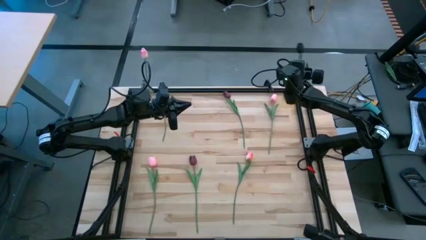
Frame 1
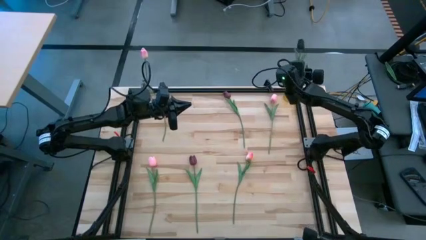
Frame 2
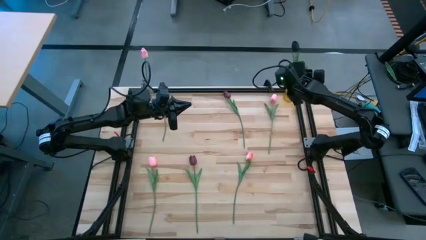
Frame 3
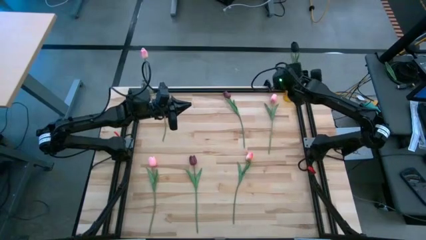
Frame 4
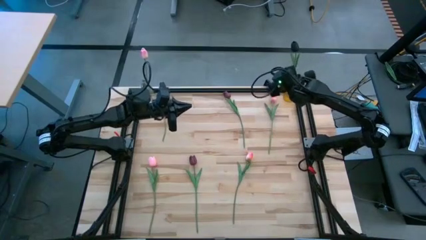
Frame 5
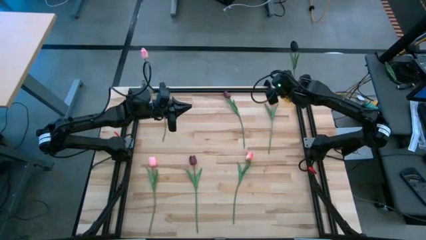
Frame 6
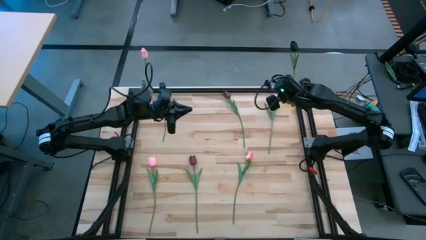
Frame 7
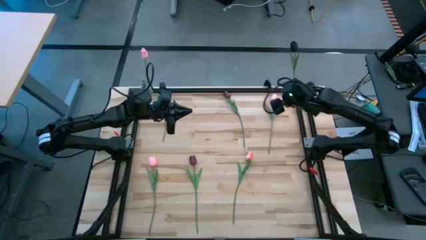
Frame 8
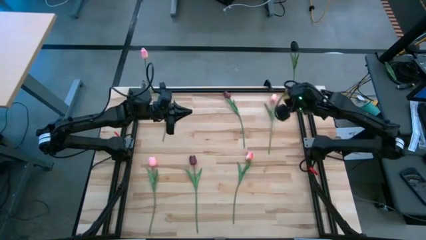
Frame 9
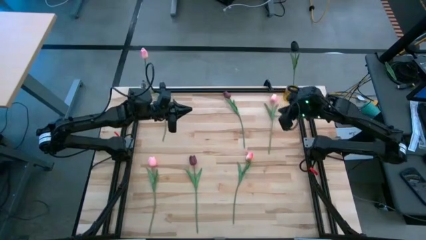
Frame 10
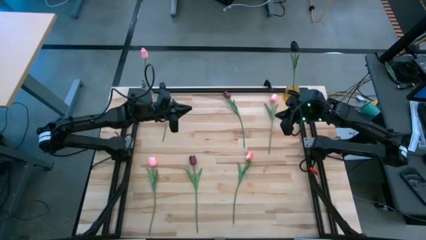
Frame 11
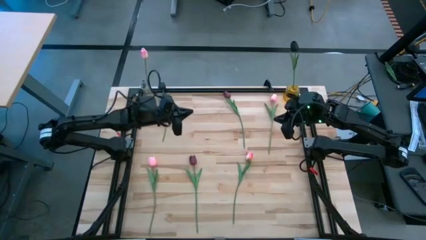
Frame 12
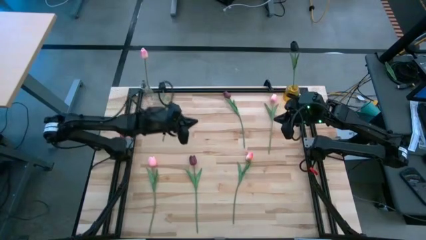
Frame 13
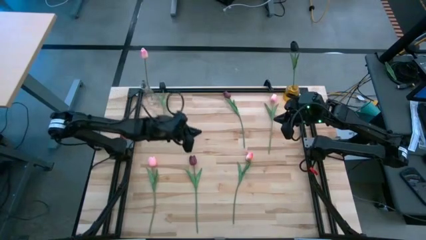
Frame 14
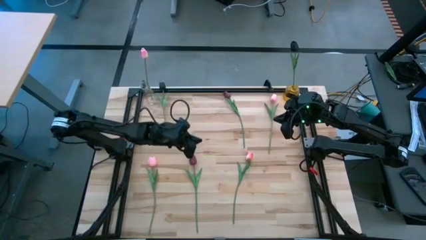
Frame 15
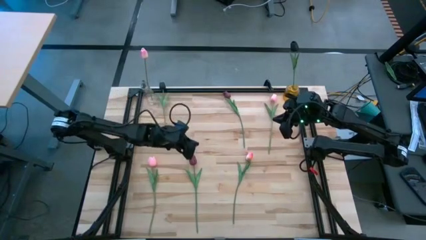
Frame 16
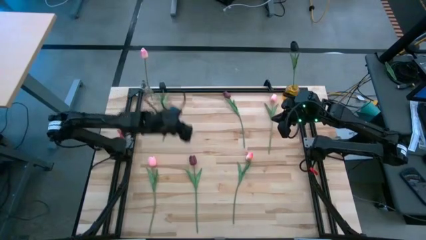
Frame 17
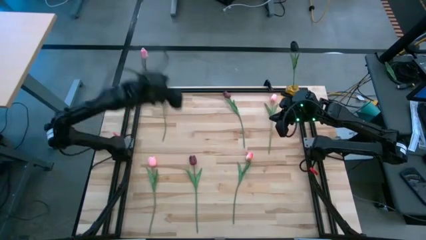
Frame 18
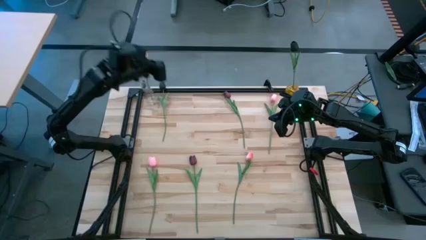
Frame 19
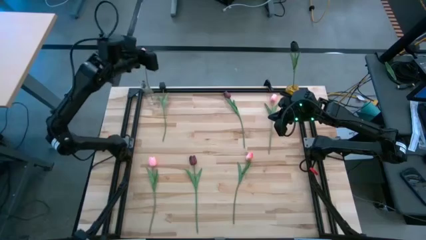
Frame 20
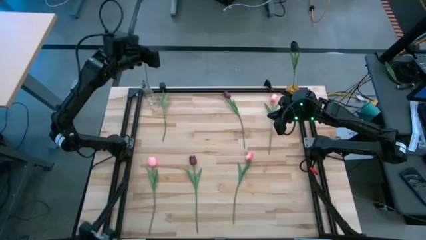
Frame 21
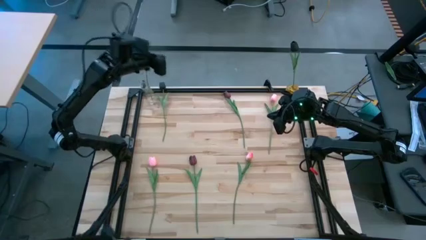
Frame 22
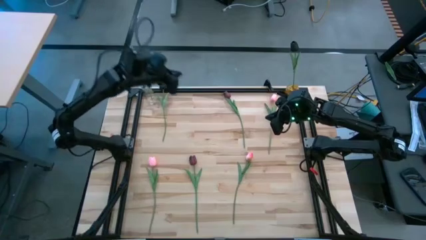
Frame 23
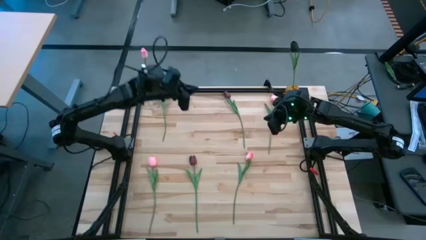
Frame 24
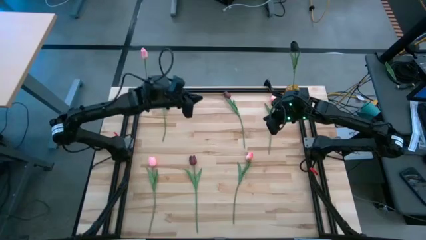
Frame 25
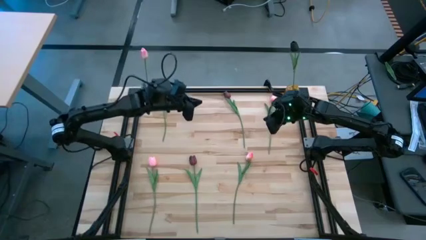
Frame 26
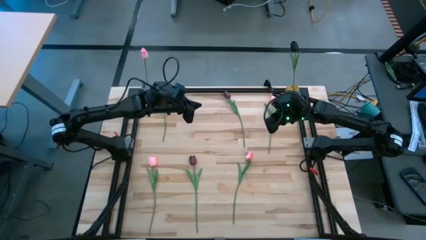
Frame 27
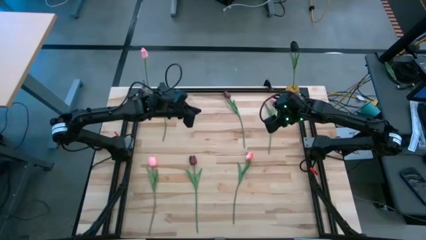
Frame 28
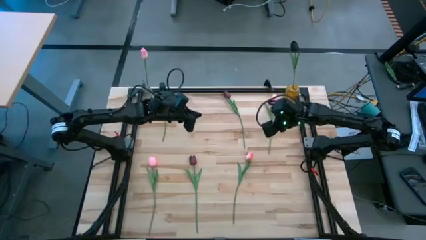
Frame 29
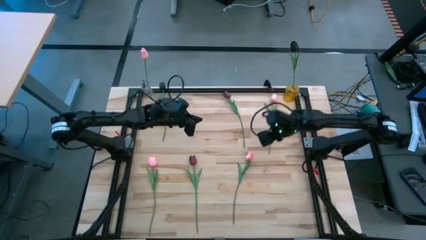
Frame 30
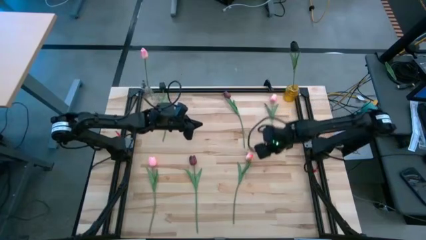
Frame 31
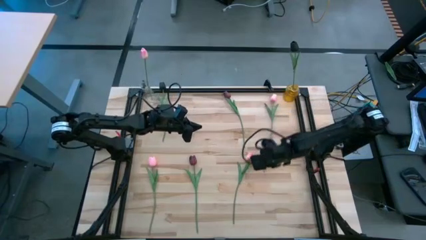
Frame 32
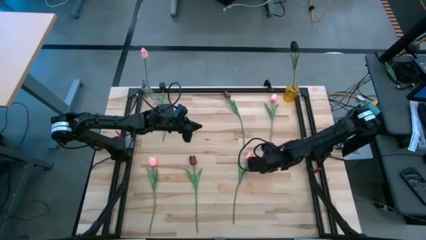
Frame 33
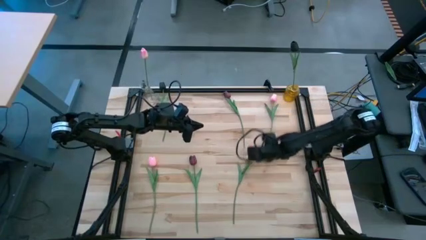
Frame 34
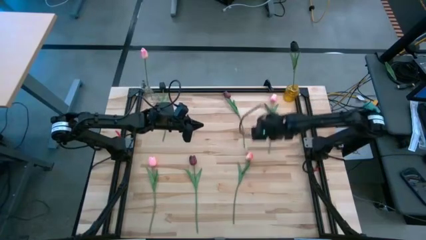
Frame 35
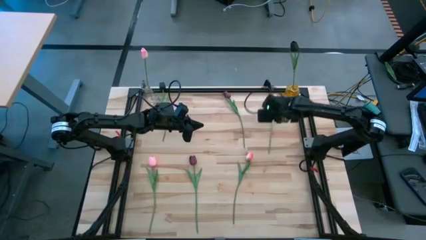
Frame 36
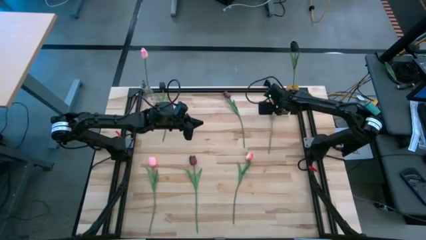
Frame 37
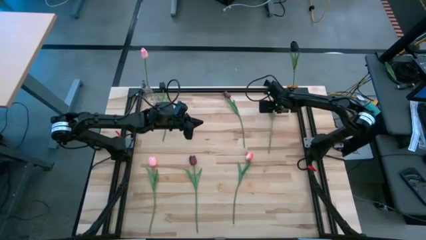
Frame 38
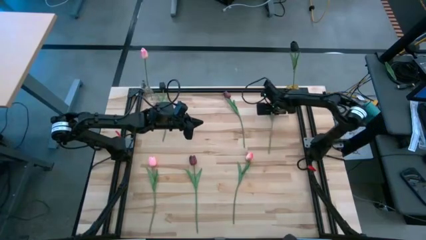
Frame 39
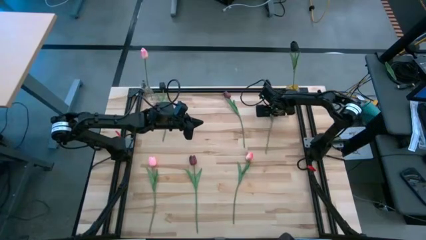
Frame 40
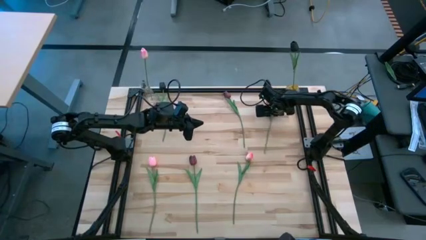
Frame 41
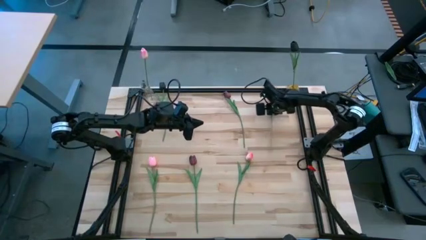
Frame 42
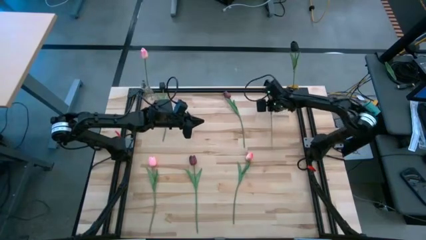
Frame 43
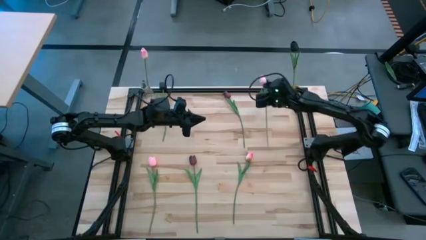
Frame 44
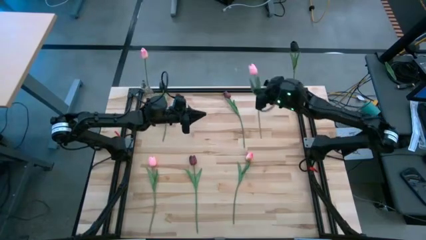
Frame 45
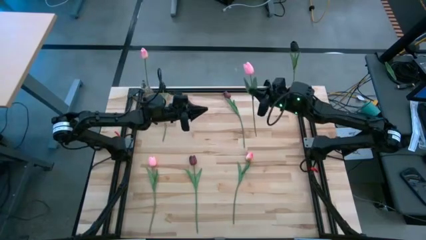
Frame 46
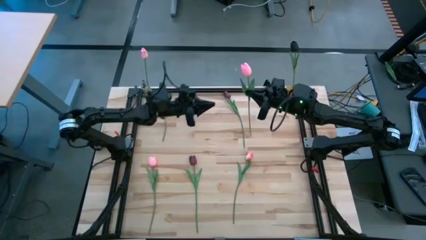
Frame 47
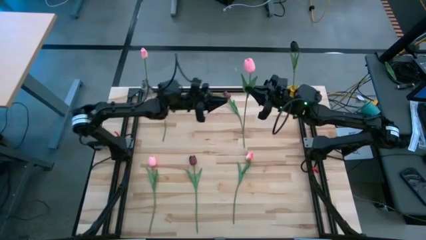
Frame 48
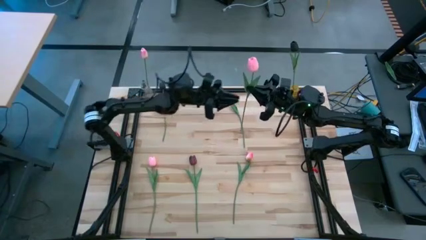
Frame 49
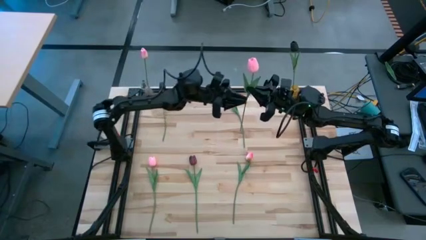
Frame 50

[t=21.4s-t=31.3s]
Task: Sort flowers into vase by color
Put the top right pink flower into the transparent vase

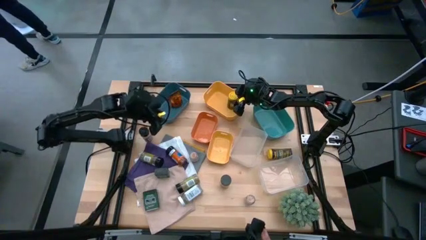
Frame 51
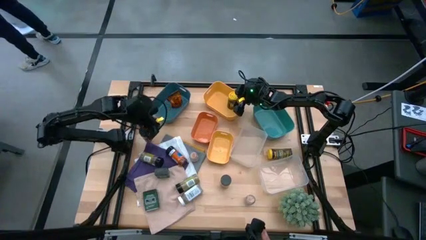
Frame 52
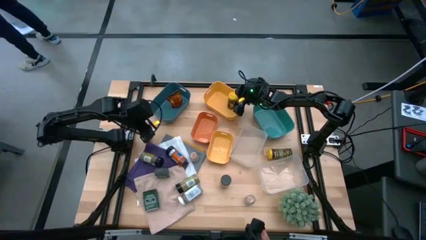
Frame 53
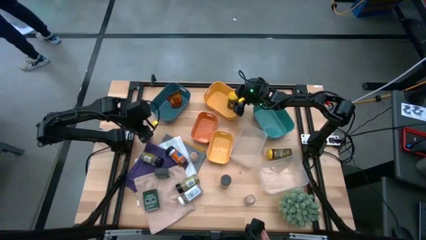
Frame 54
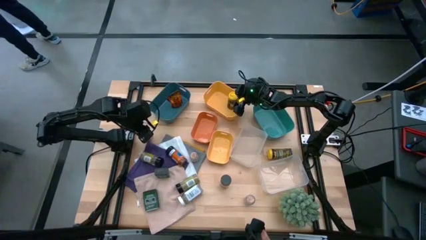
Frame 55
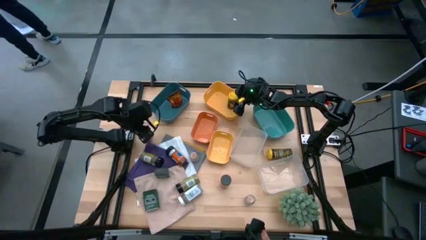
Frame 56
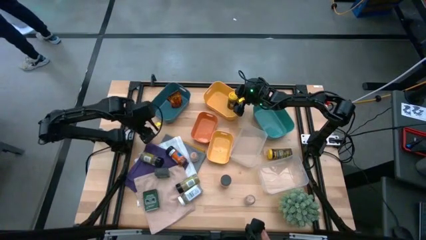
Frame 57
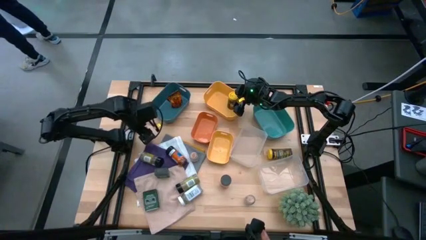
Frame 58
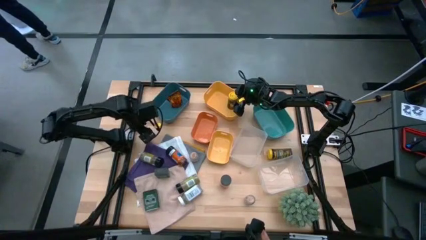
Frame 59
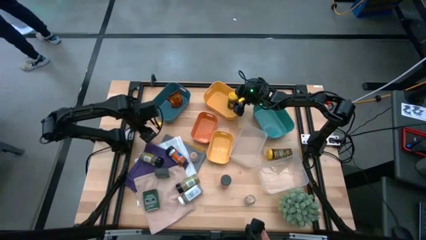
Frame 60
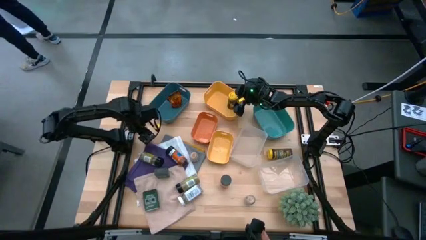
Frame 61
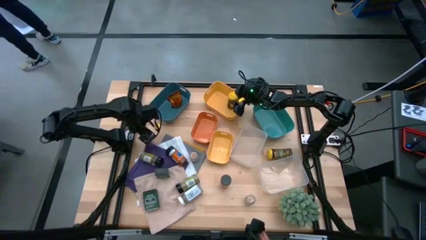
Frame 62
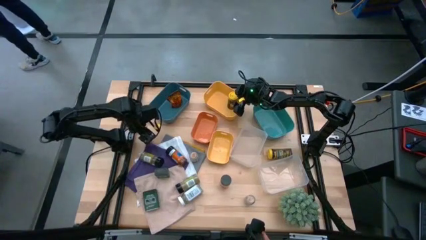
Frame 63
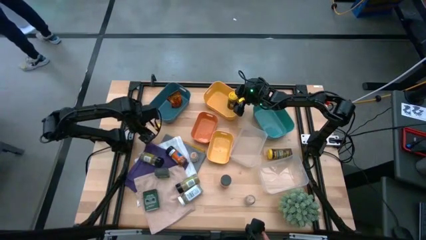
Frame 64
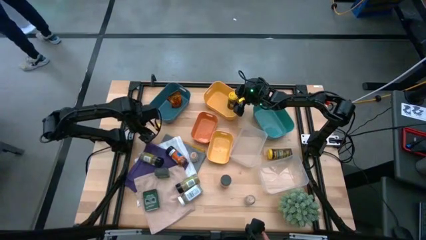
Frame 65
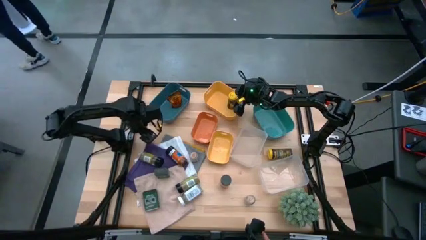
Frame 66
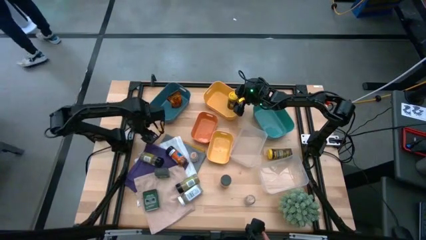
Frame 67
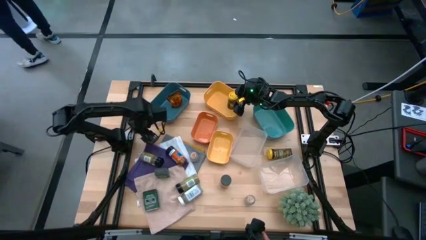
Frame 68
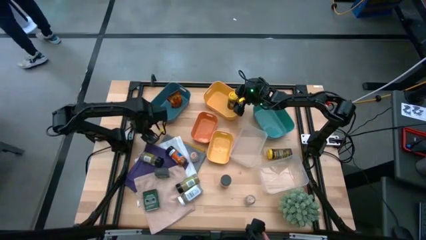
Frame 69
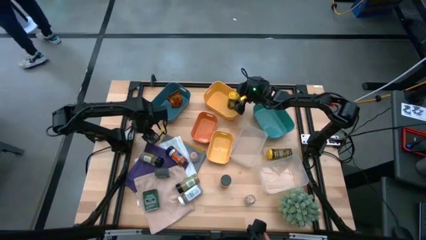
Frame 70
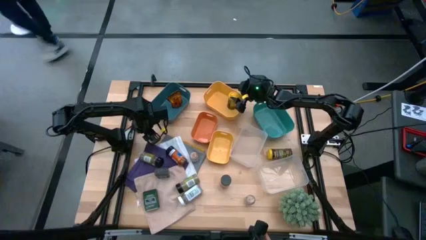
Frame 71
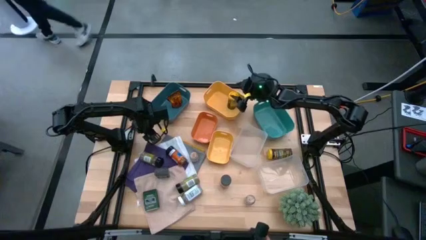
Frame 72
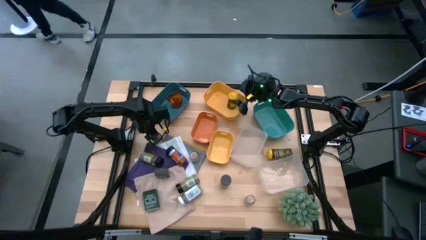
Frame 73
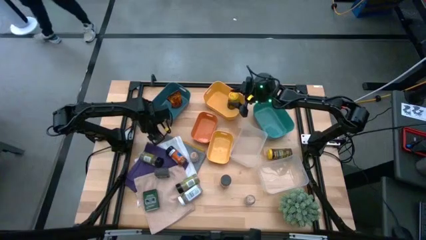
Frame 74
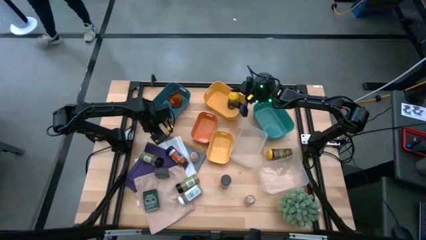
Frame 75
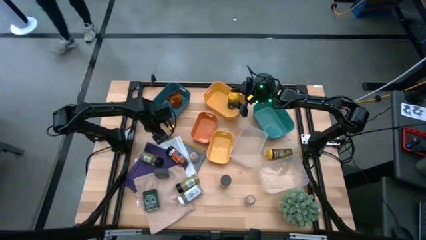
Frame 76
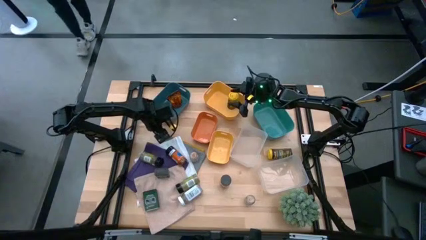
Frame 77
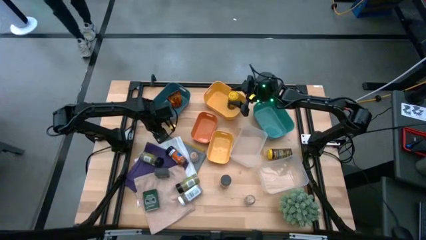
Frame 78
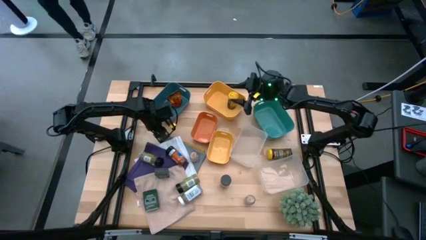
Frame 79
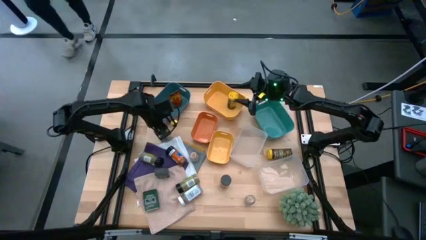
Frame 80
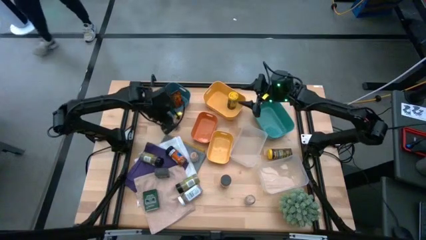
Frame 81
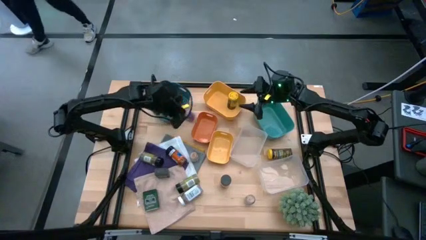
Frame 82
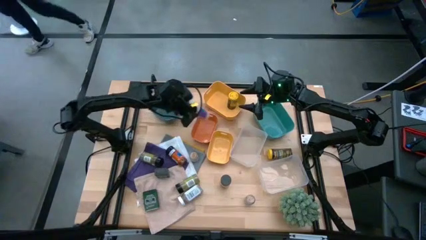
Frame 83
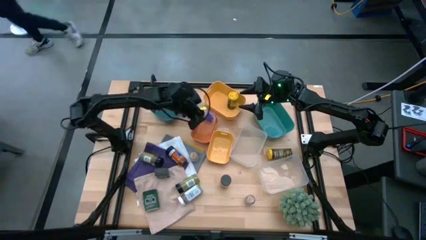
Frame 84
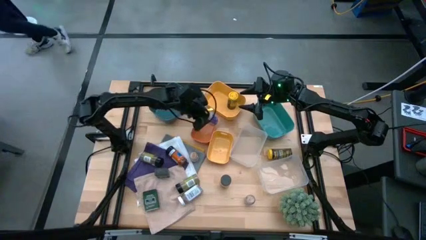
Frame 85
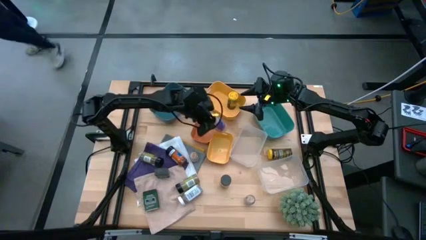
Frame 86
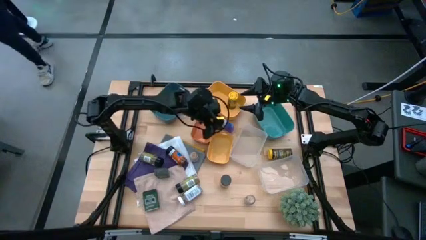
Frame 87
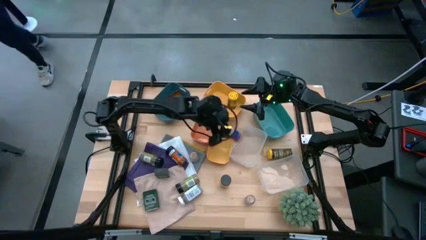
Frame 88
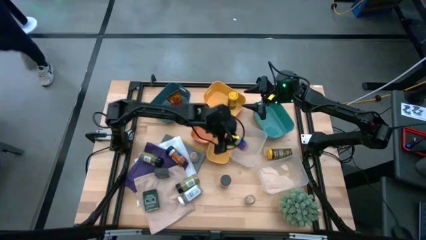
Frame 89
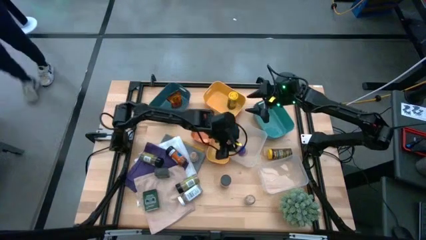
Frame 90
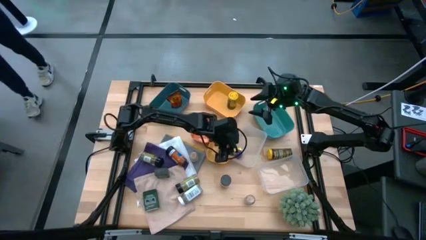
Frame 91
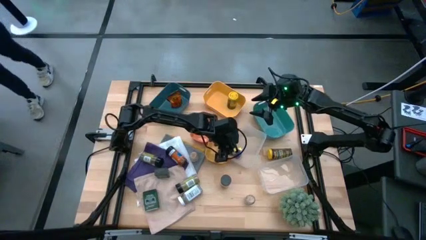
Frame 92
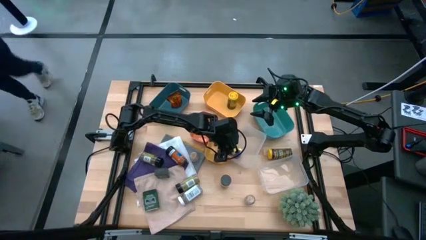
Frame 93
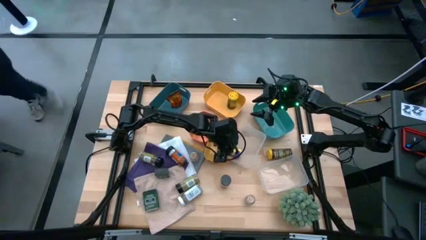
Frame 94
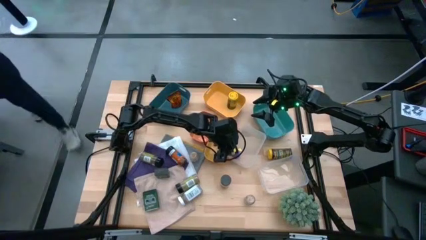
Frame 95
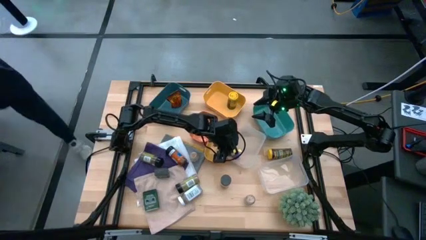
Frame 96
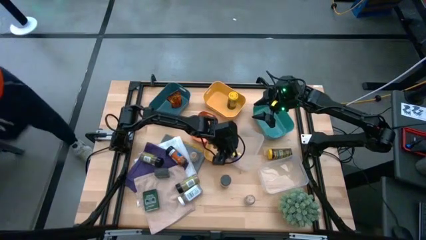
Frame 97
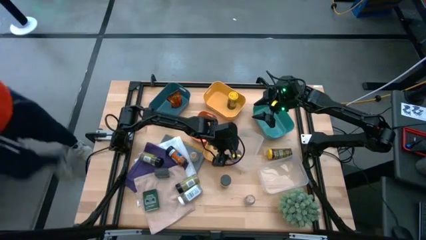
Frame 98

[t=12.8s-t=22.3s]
Task: Sort spices by type
Put the black seasoning bottle into the left white bin
